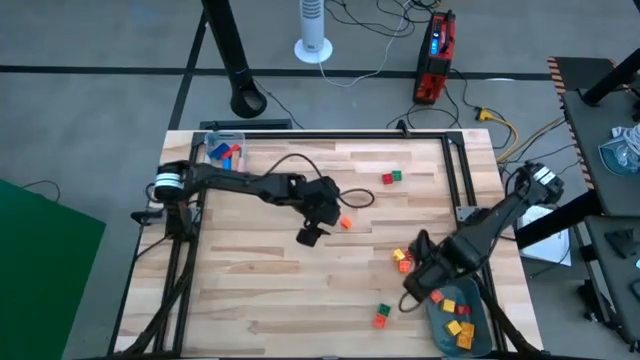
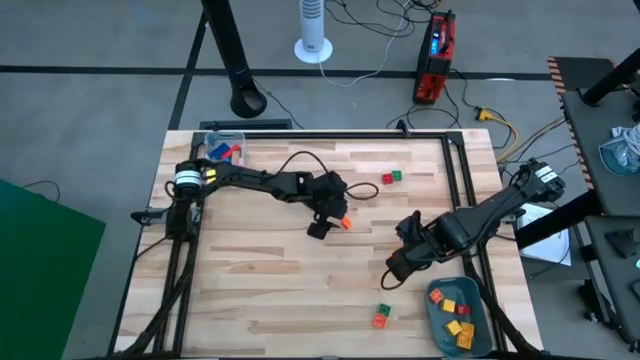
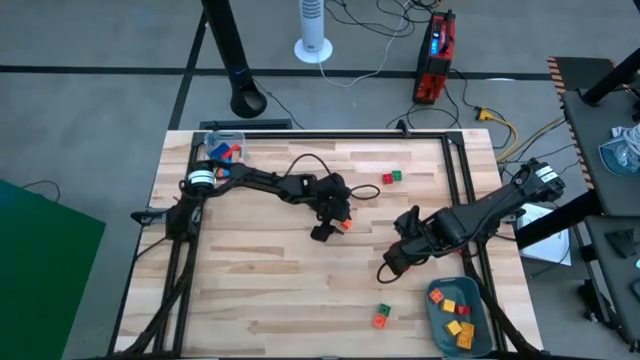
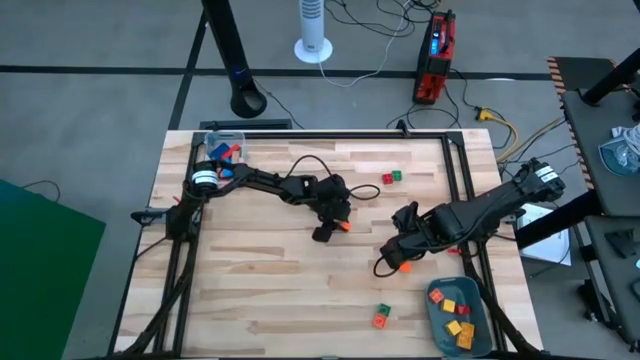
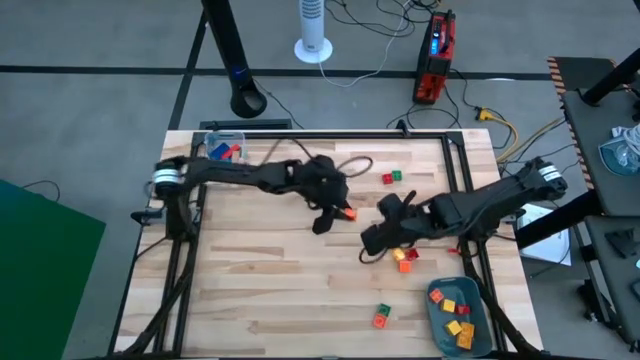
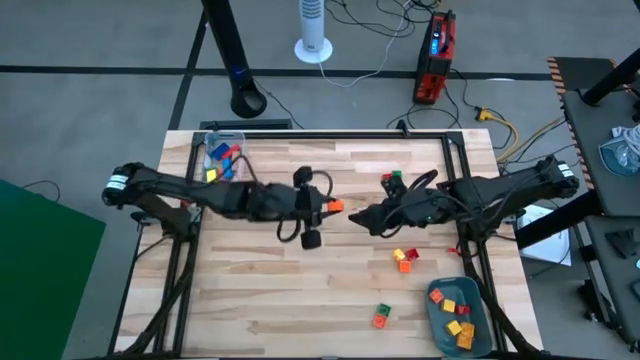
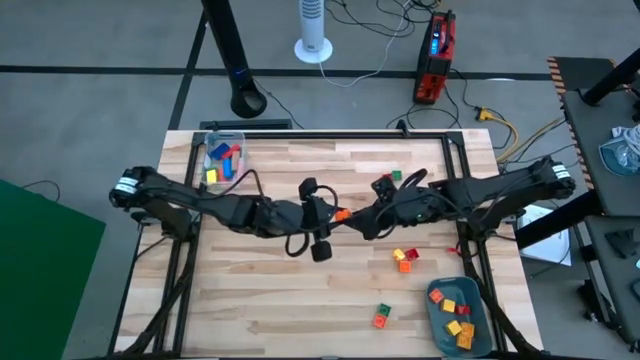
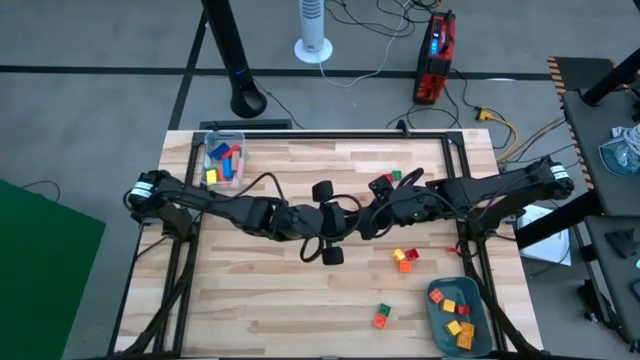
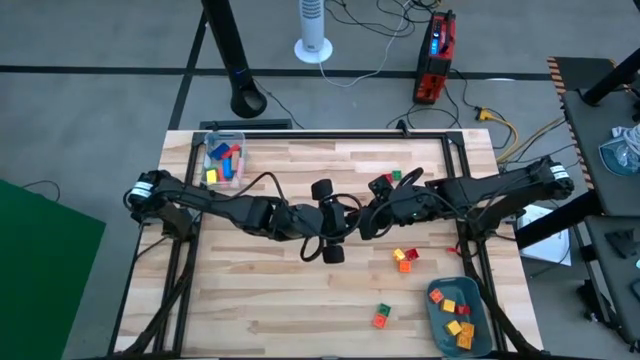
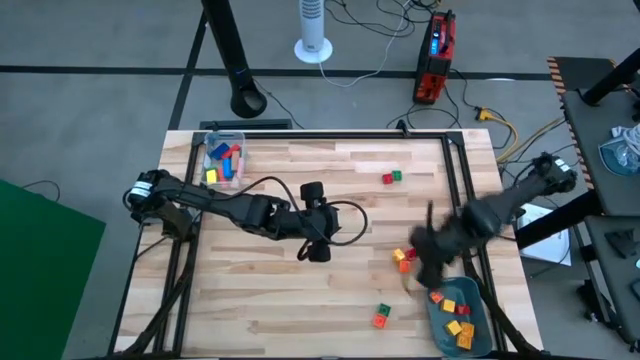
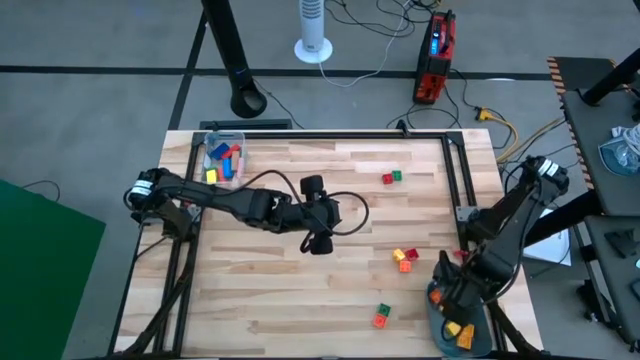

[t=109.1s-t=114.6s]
Task: Sort blocks by size
Put the orange square game piece into the blue bin

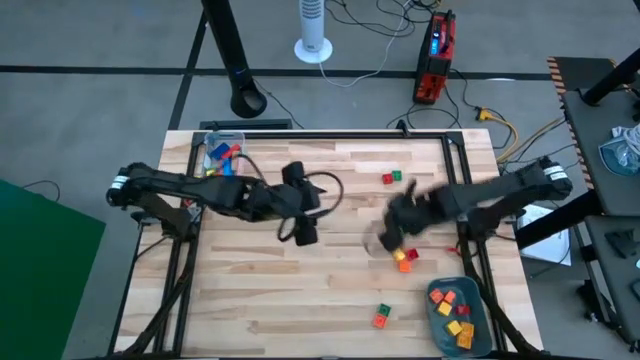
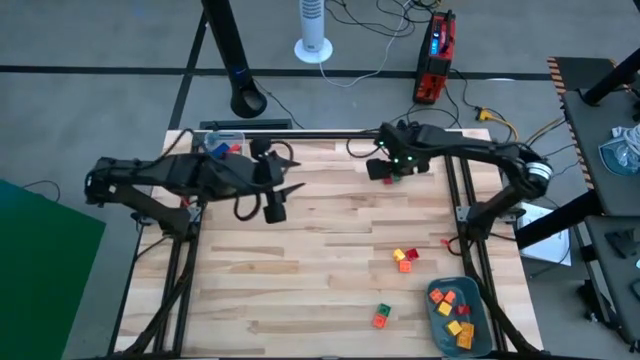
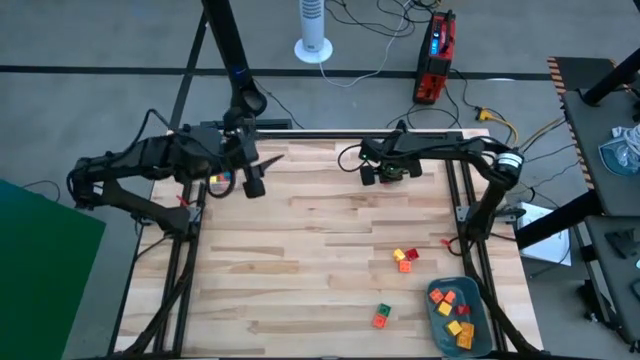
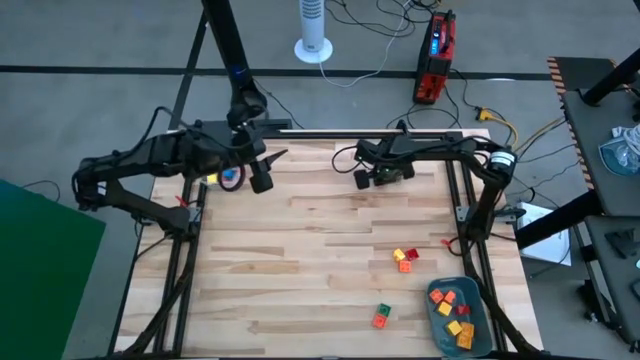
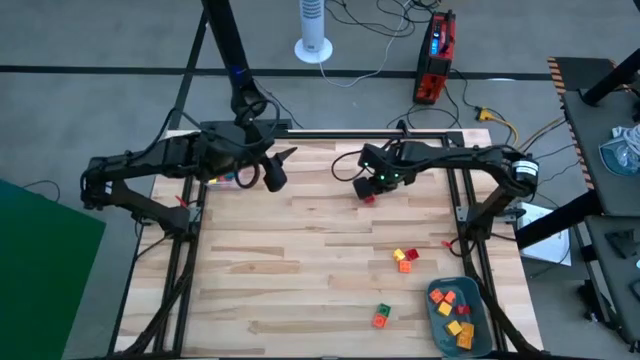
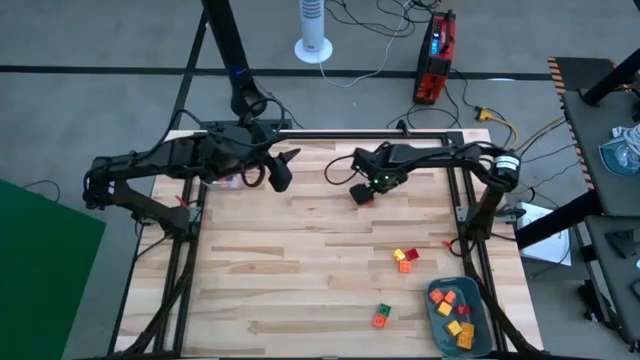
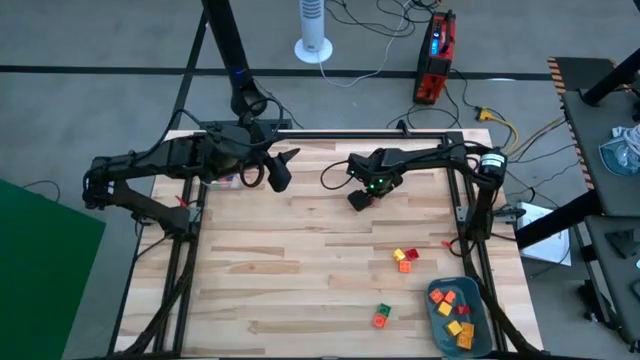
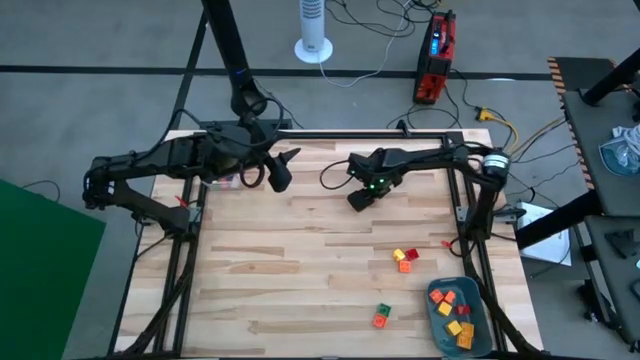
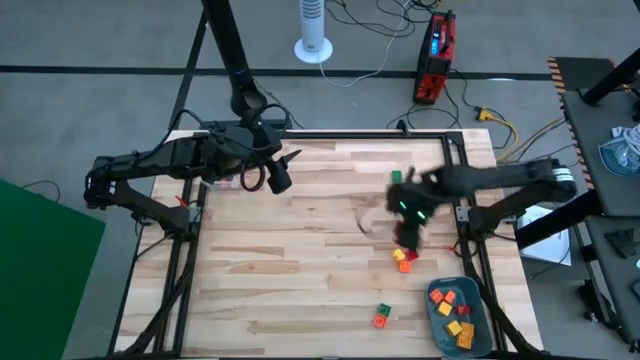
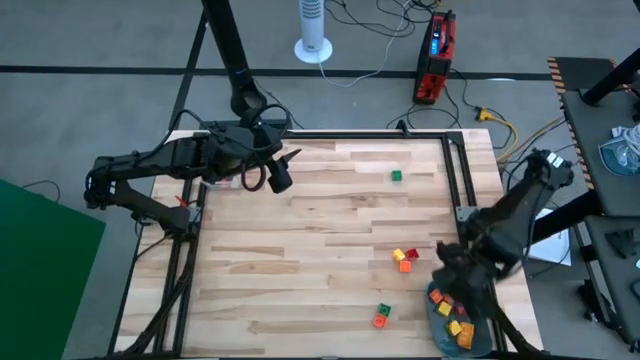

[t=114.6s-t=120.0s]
Put the red square game piece into the blue bin

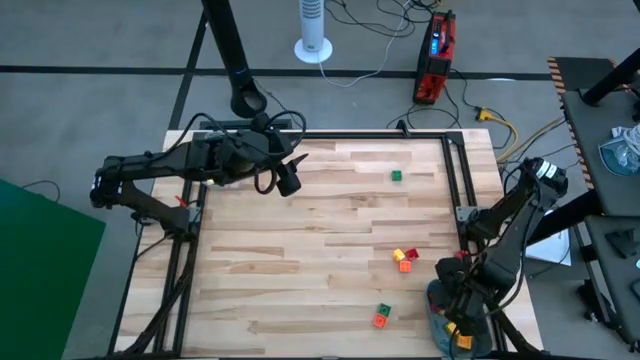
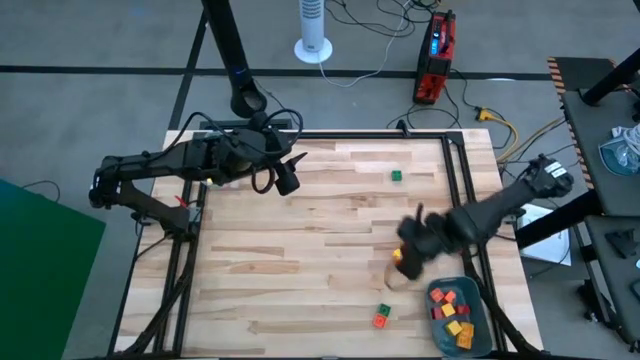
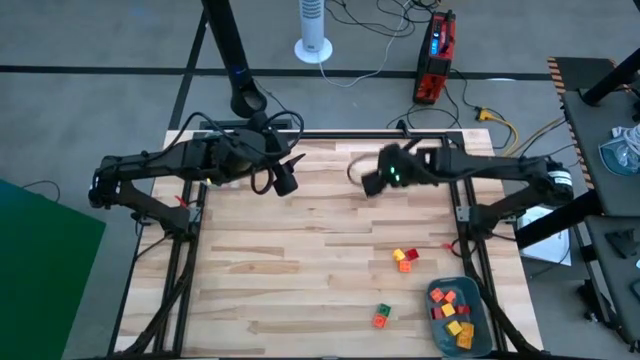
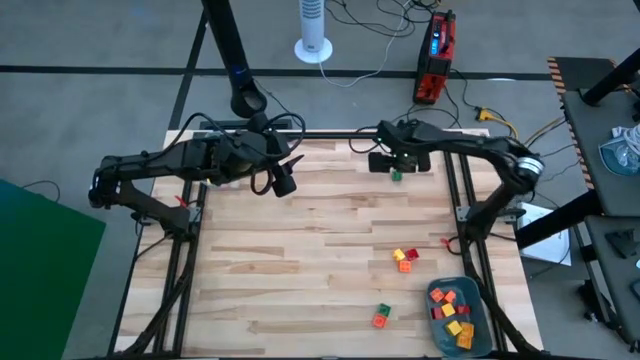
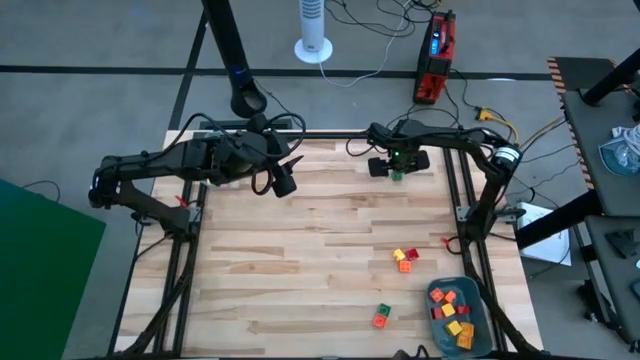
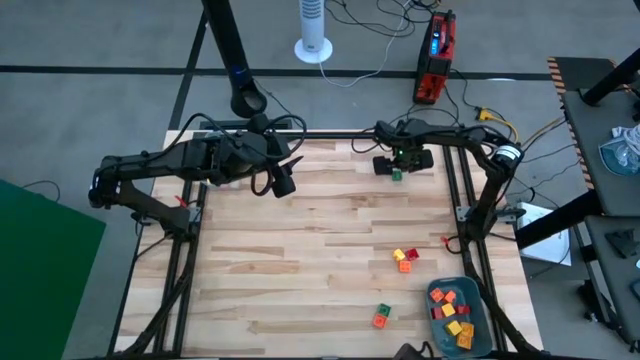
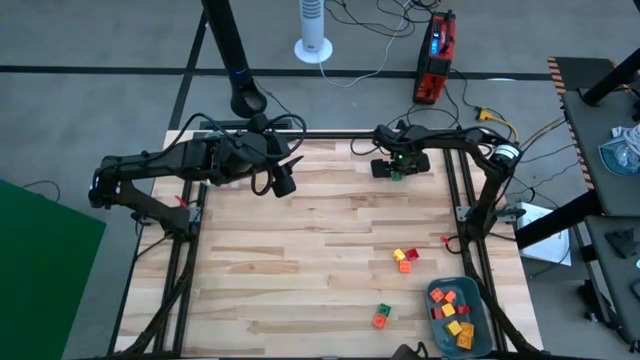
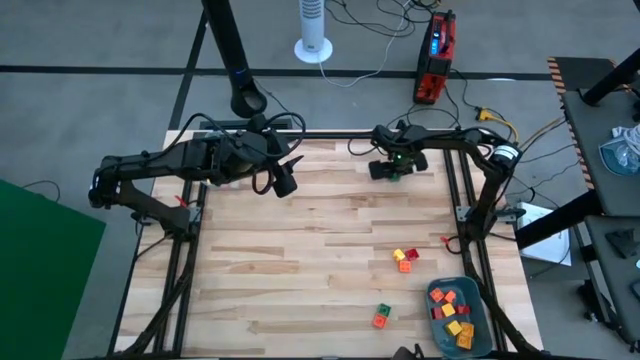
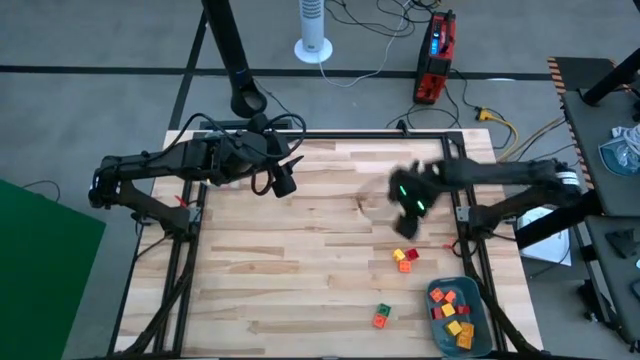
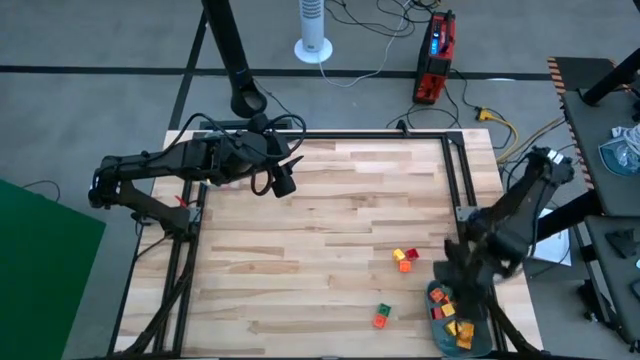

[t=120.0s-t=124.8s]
Put the green square game piece into the blue bin

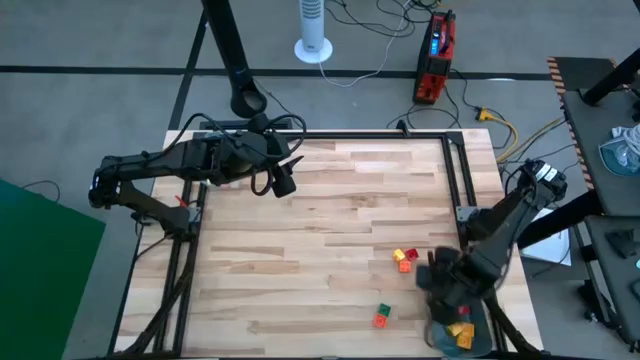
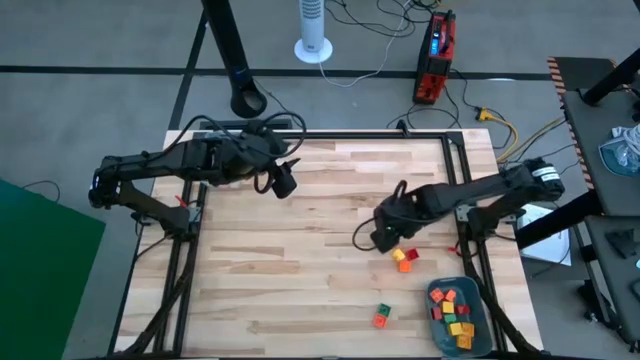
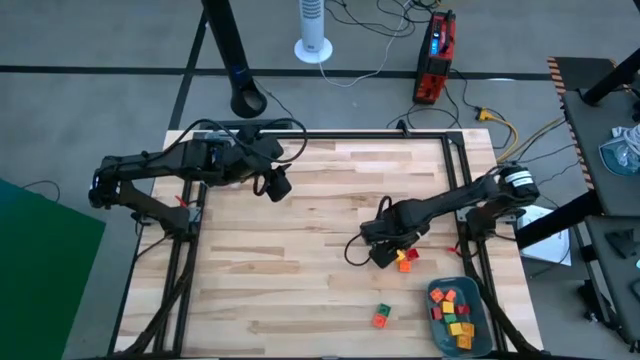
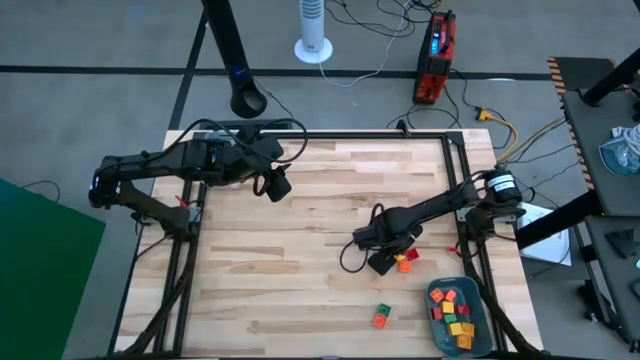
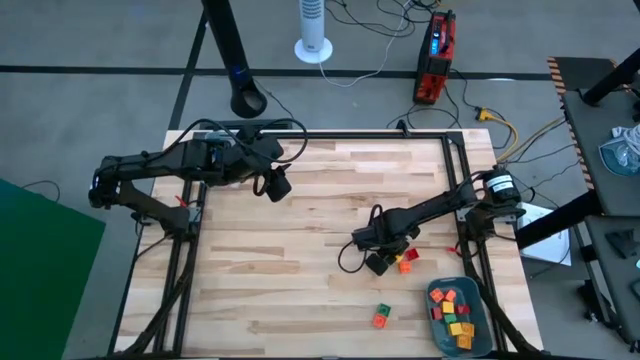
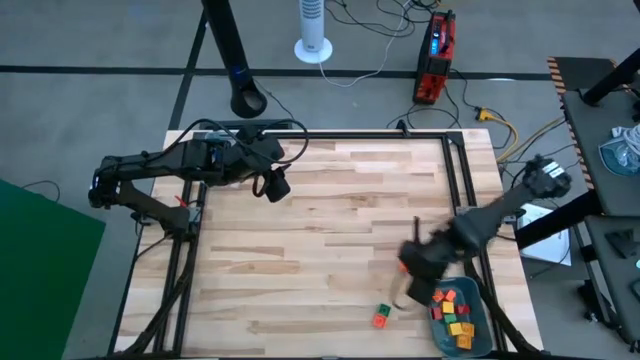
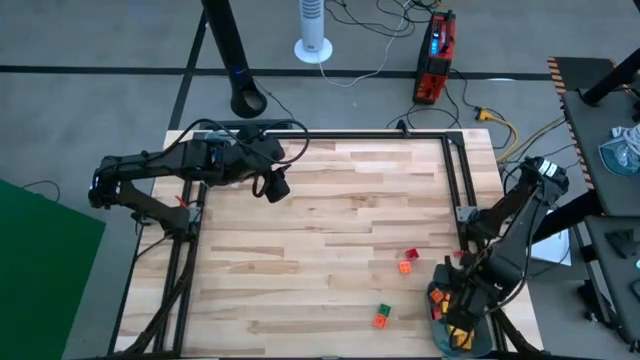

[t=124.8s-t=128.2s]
Put the yellow square game piece into the blue bin

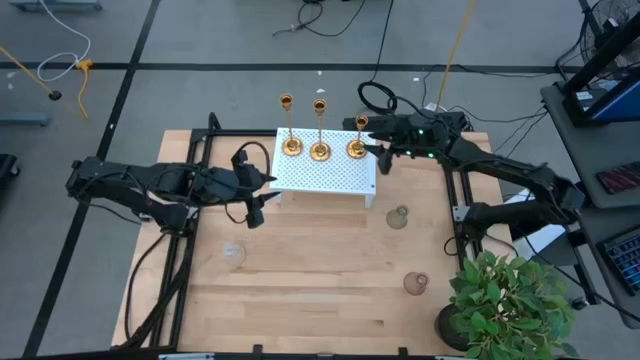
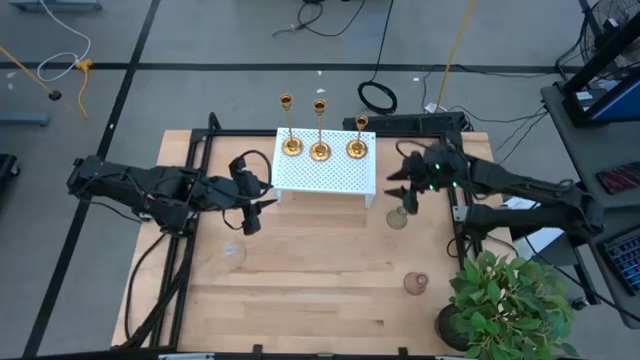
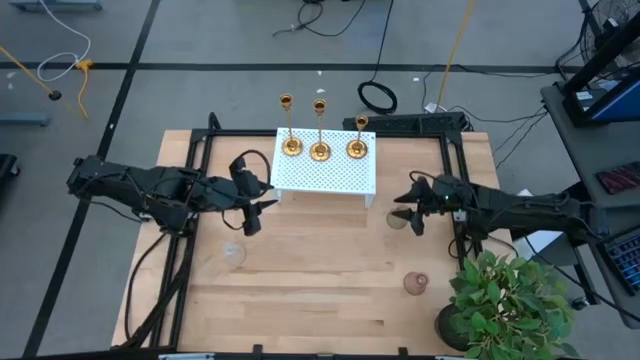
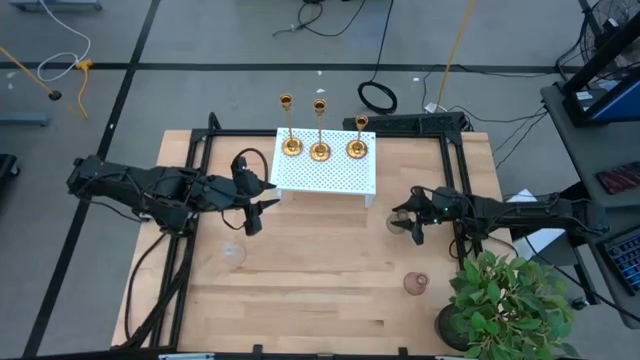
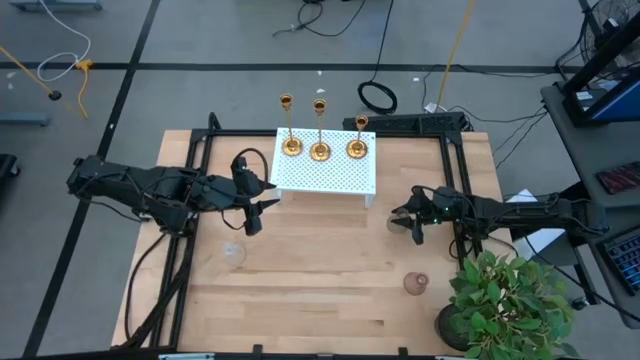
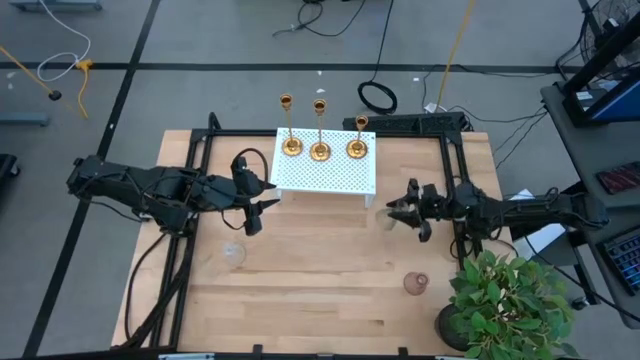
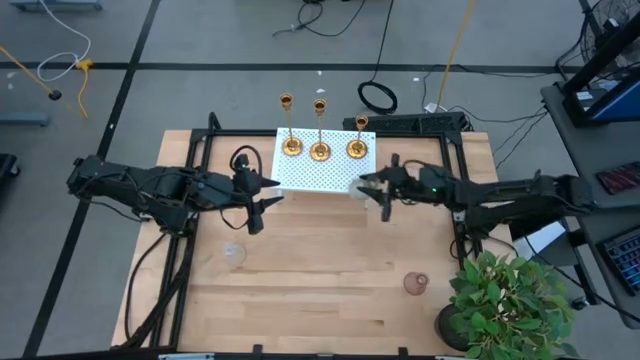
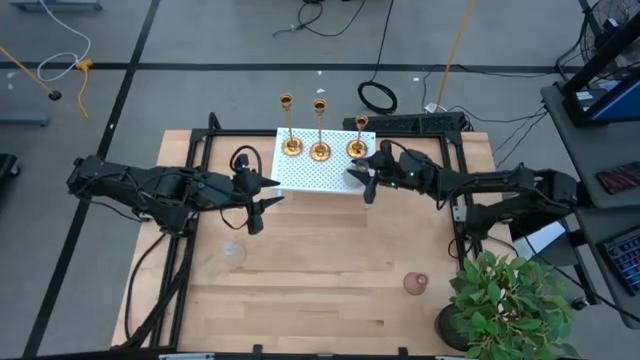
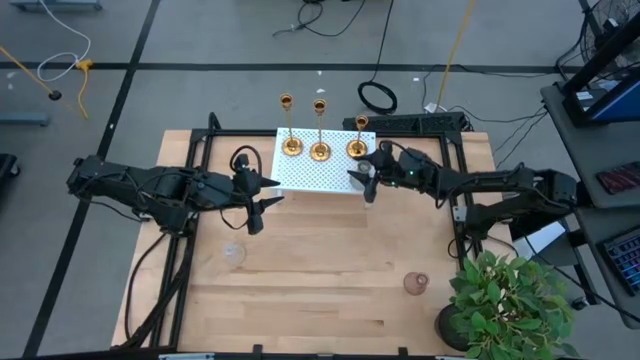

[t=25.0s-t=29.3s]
Task: Pick & Place candle stick holders
Put the green vase on the shelf
